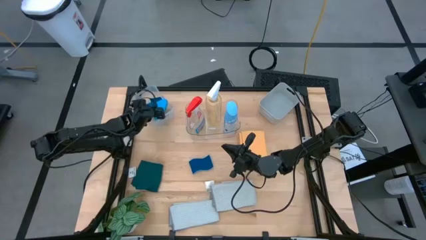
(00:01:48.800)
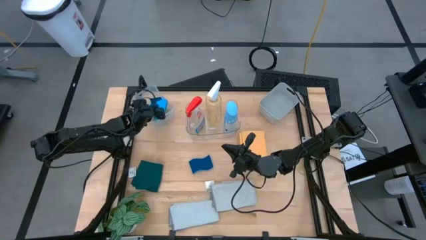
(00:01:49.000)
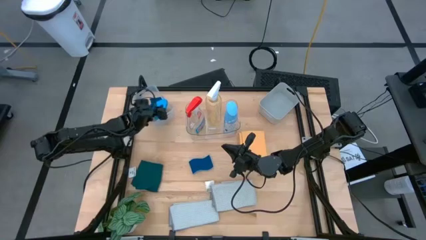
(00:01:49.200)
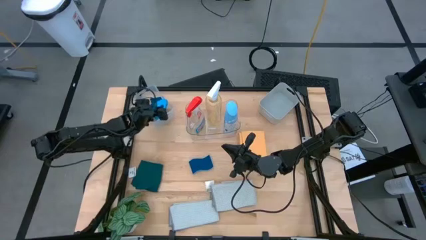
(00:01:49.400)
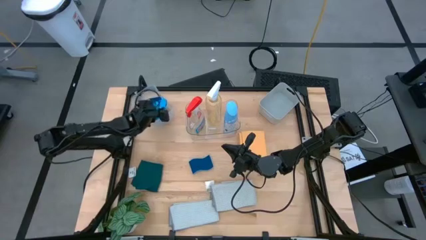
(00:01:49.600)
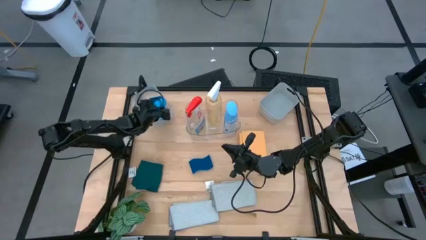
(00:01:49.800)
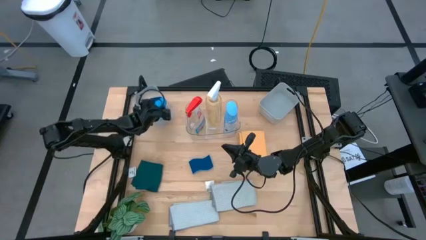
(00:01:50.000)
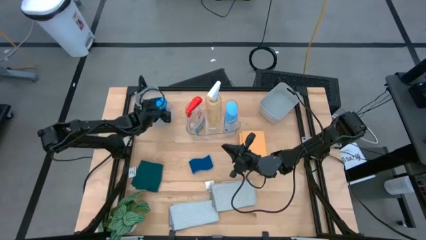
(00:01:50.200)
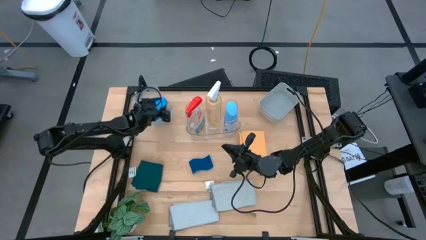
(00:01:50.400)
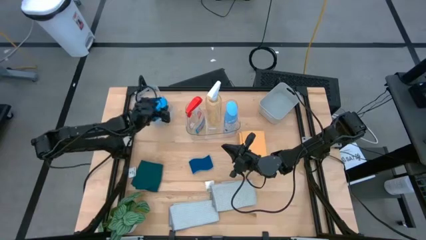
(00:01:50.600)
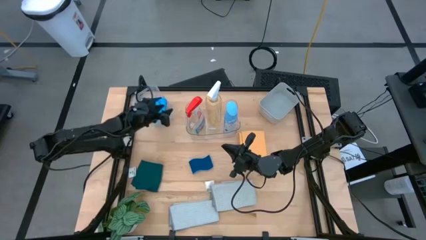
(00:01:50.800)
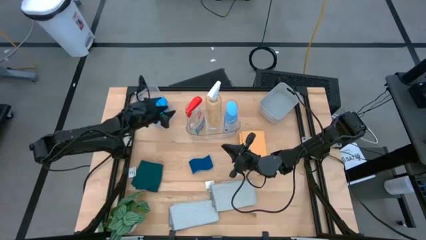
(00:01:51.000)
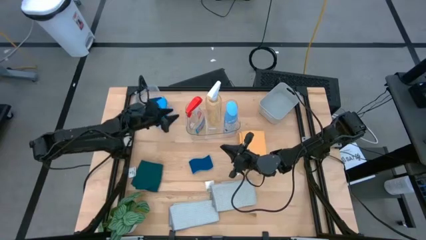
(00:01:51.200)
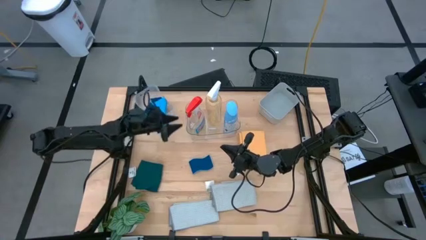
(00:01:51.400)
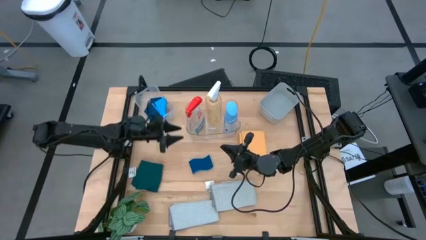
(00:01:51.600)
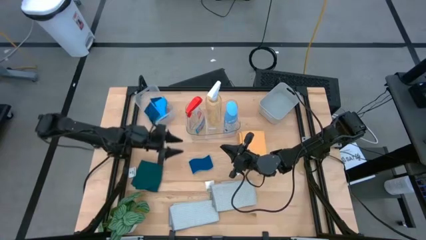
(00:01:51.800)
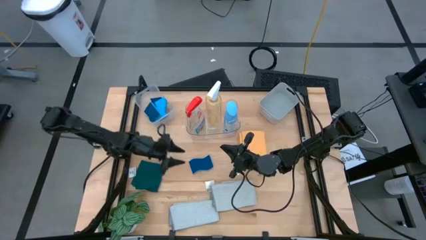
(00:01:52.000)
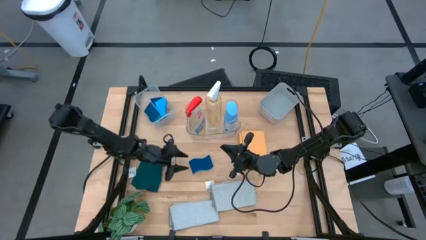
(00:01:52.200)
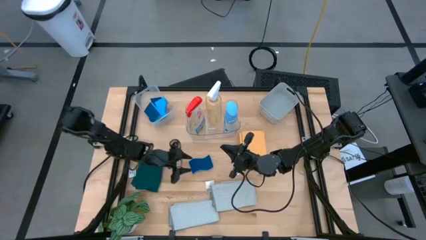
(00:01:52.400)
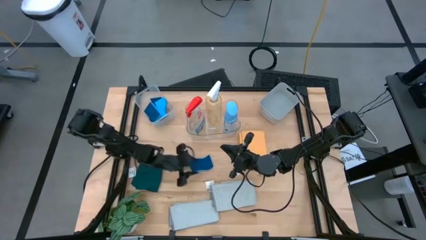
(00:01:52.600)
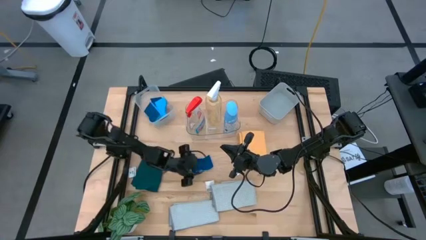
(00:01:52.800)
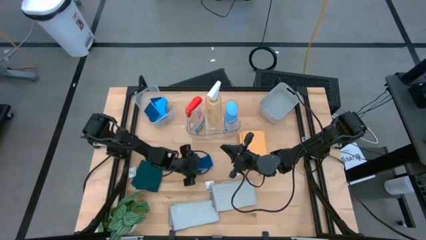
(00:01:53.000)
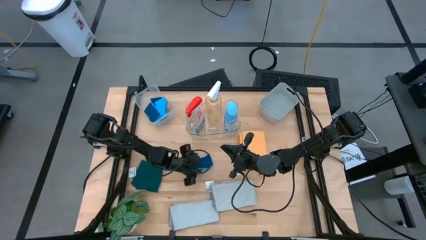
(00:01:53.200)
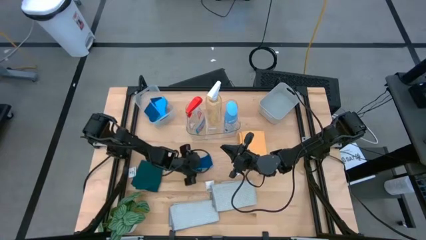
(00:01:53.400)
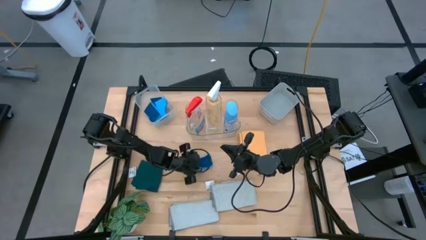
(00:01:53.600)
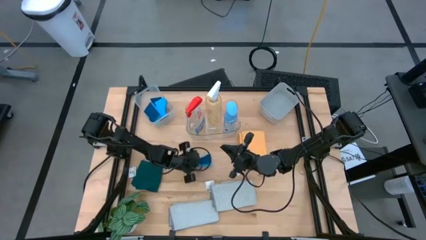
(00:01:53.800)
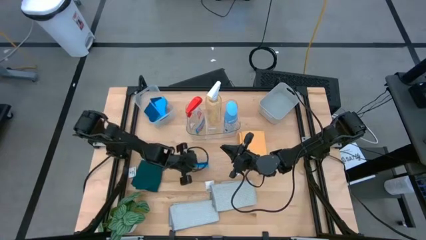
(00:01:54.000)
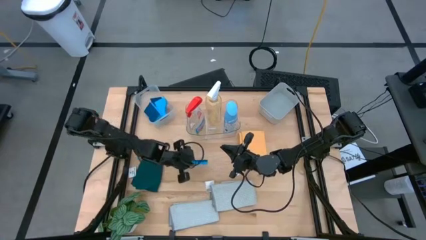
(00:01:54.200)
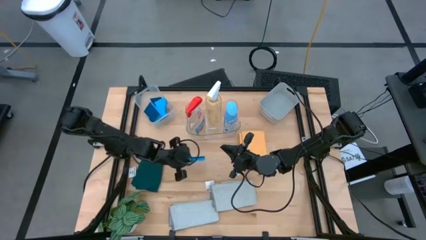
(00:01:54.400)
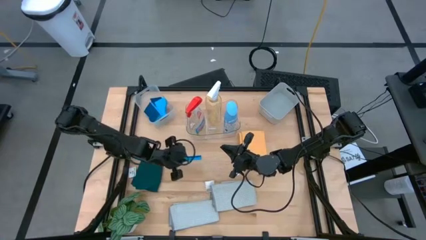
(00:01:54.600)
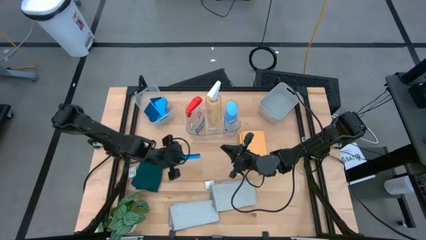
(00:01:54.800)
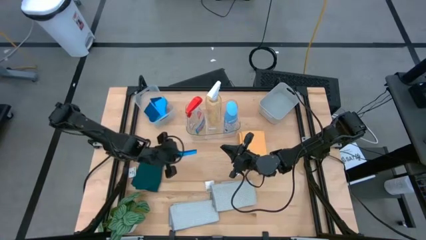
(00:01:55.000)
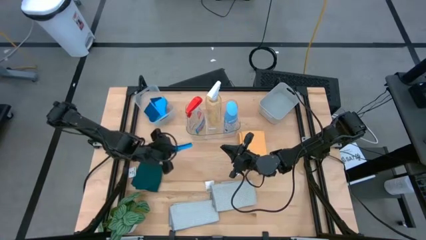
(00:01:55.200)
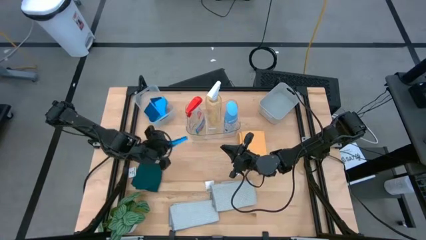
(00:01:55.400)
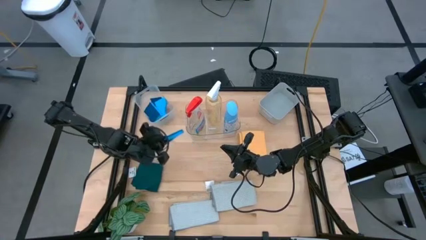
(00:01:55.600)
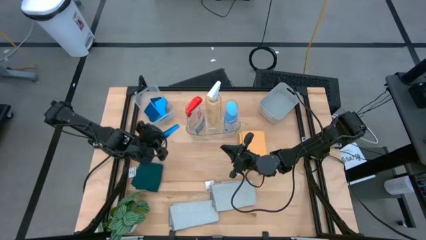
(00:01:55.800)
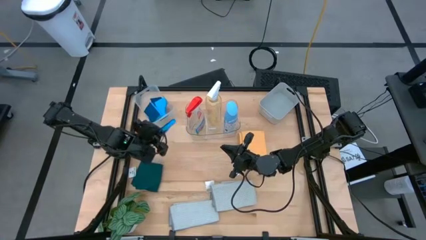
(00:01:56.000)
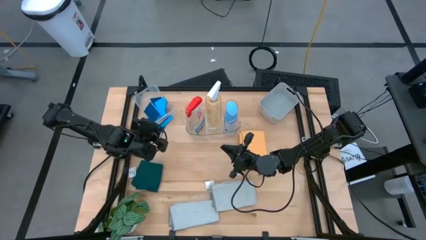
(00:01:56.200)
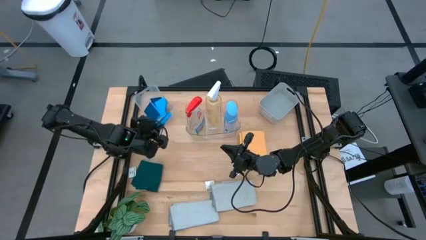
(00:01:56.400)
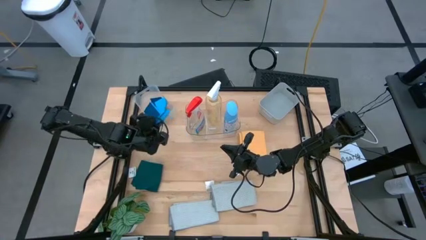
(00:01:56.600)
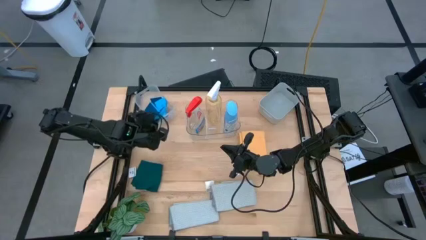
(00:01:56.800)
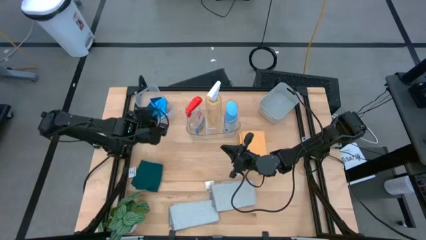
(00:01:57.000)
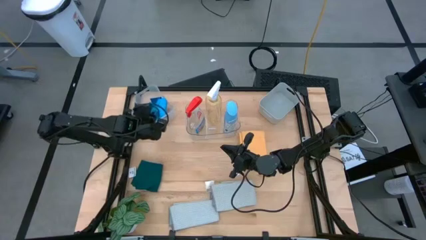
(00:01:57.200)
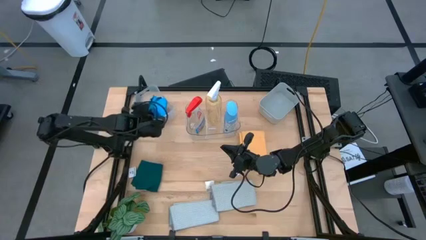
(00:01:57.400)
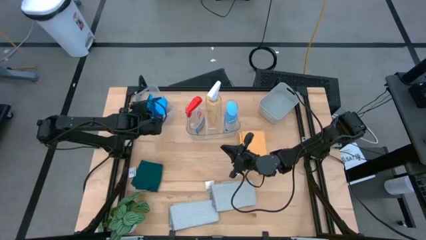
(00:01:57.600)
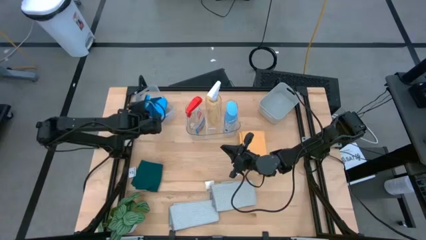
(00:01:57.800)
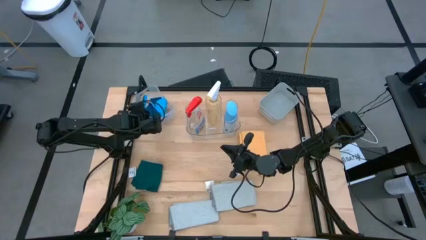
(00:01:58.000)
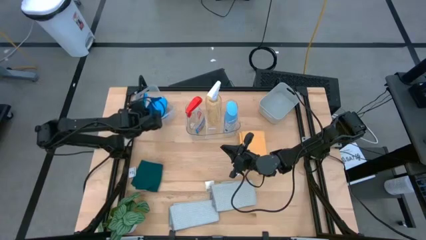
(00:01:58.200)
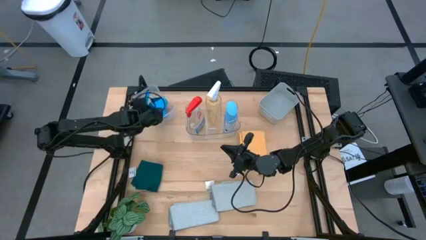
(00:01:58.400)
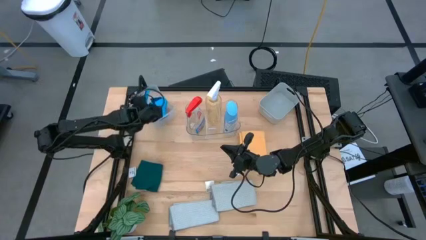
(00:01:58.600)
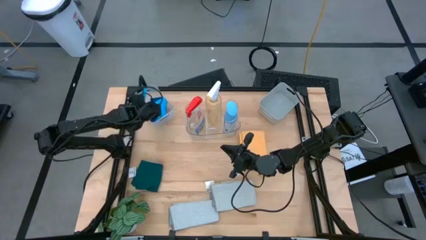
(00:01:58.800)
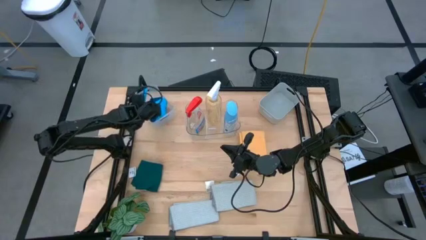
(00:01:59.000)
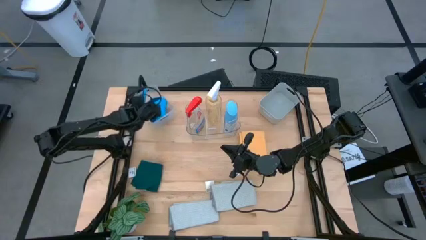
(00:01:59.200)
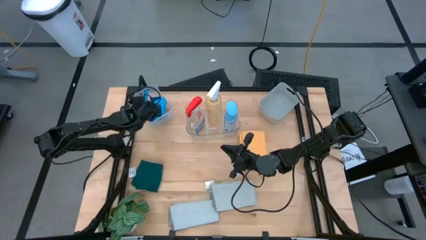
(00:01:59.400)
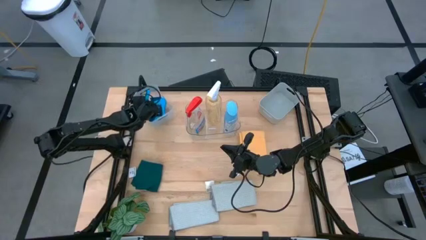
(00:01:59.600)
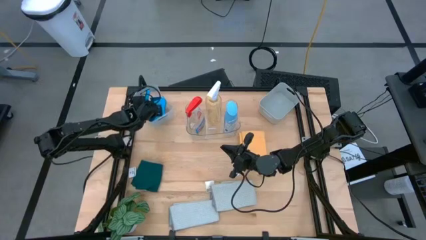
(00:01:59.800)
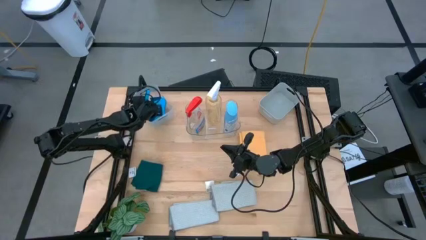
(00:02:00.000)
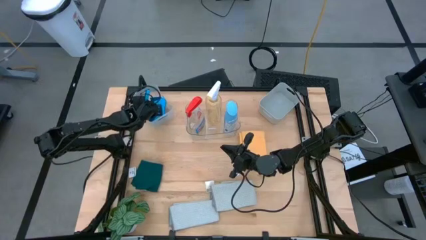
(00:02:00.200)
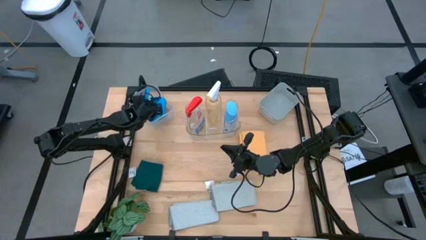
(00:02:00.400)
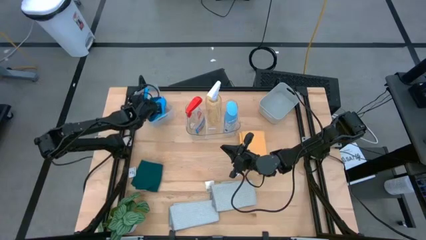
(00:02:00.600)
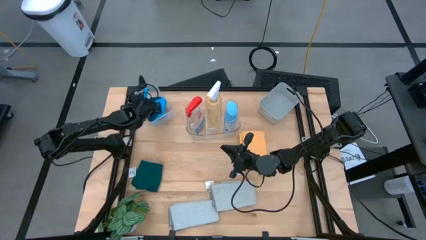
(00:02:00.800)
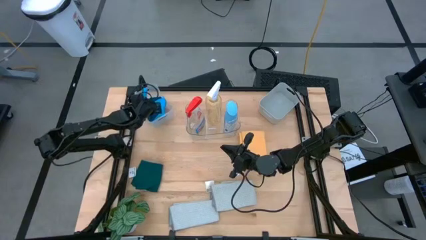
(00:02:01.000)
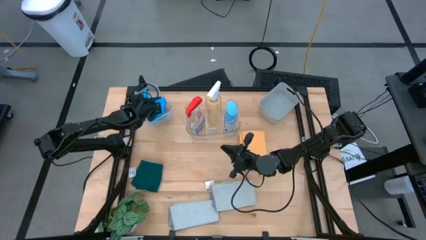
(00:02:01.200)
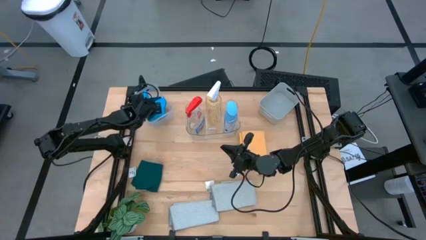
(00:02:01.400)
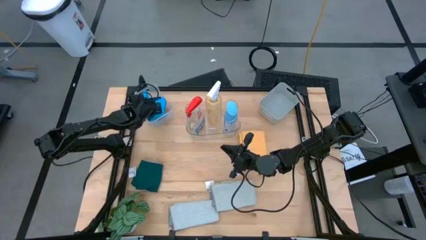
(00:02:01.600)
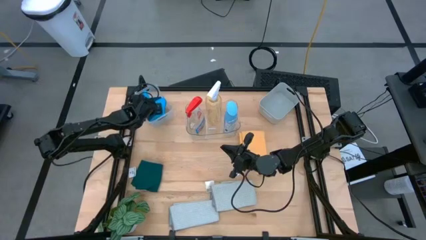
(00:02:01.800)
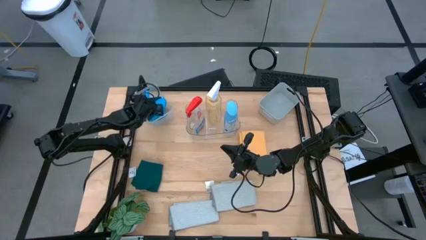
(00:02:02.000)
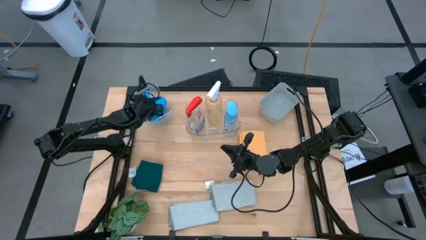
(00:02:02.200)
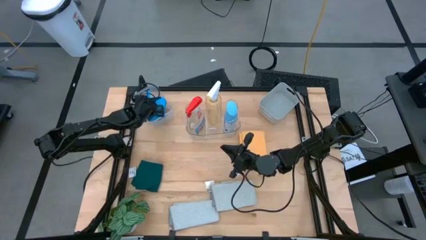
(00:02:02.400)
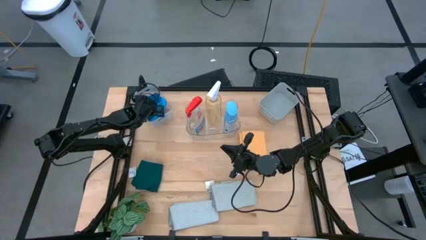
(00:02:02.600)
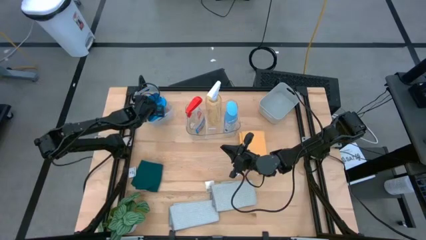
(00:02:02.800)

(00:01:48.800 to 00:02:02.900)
Task: Pick & Place Kitchen Items
Put the blue sponge into the white bin
